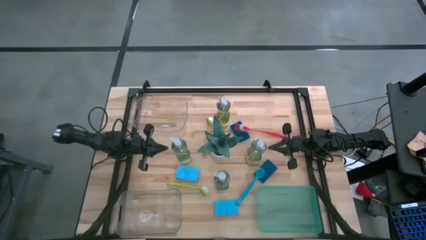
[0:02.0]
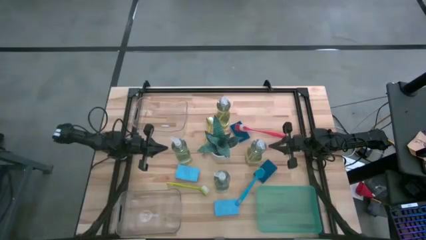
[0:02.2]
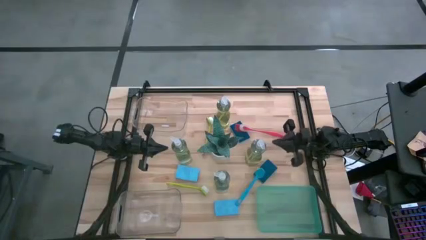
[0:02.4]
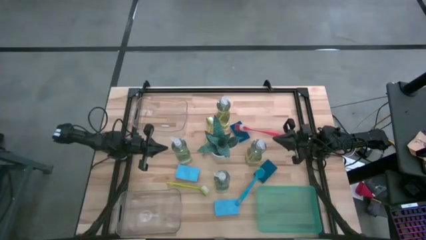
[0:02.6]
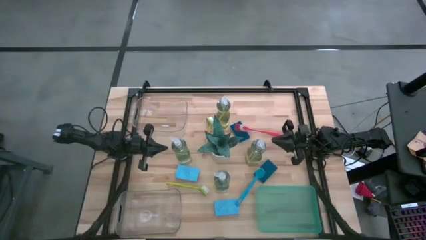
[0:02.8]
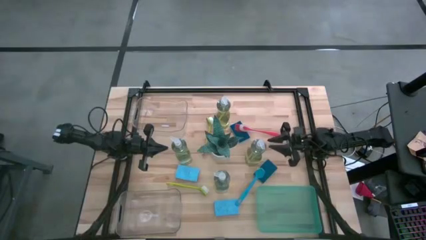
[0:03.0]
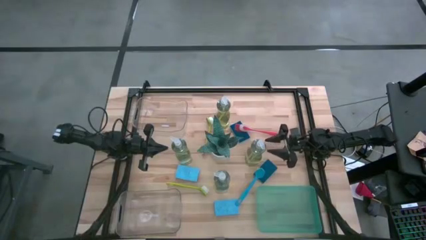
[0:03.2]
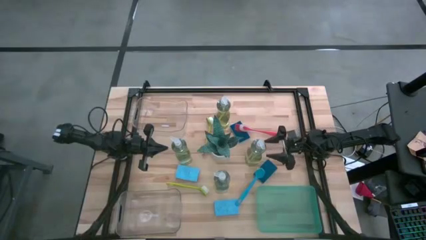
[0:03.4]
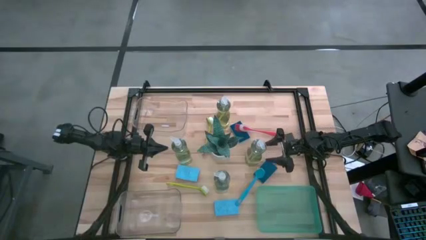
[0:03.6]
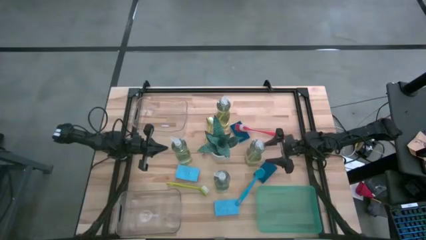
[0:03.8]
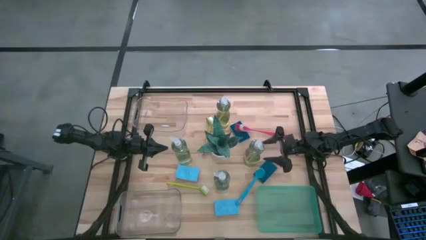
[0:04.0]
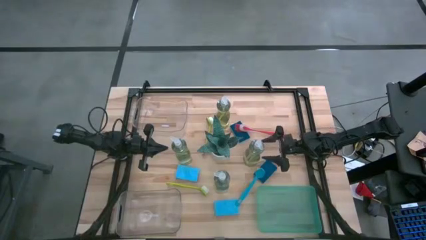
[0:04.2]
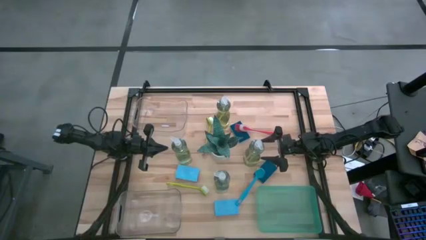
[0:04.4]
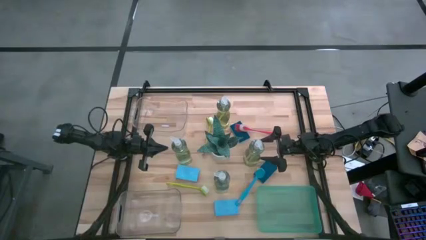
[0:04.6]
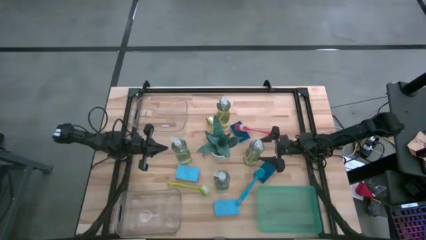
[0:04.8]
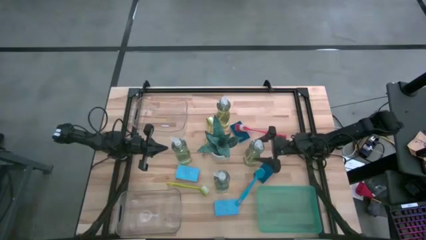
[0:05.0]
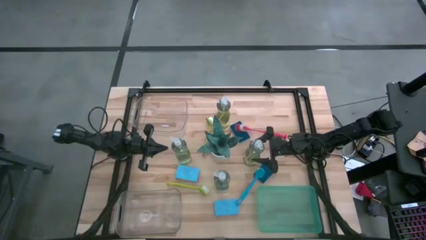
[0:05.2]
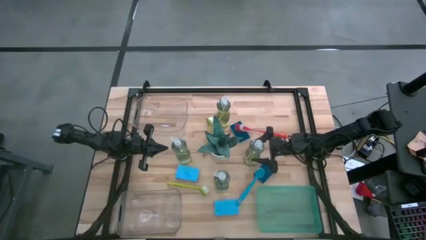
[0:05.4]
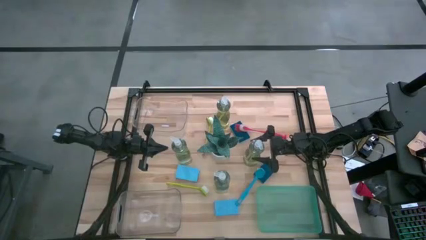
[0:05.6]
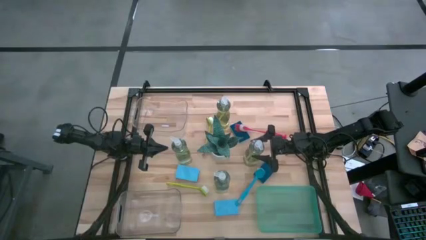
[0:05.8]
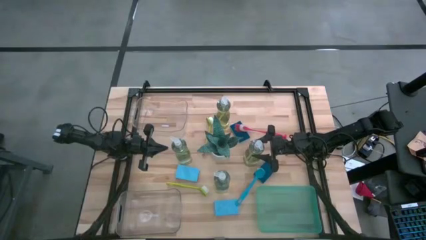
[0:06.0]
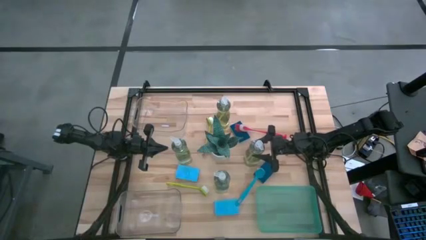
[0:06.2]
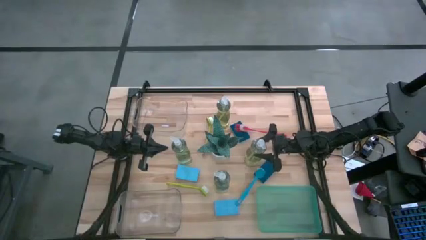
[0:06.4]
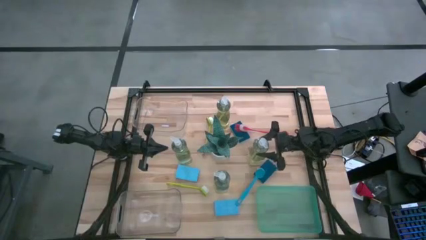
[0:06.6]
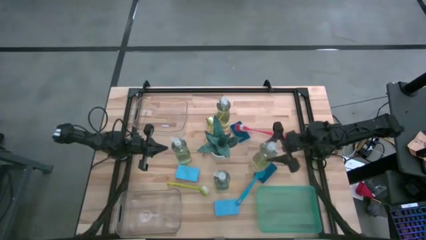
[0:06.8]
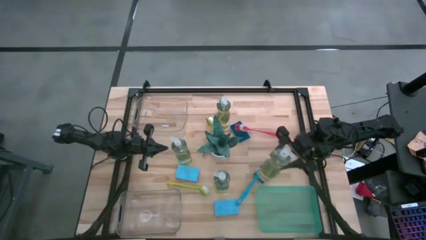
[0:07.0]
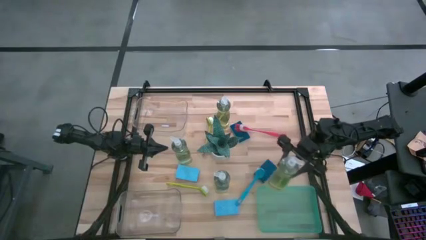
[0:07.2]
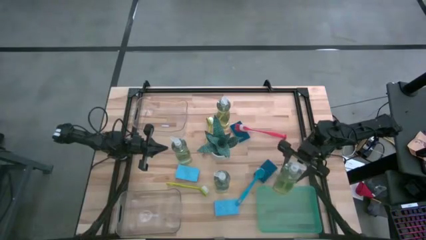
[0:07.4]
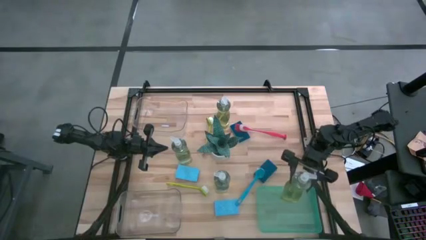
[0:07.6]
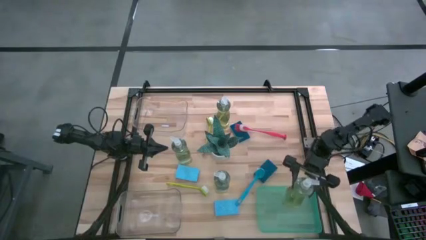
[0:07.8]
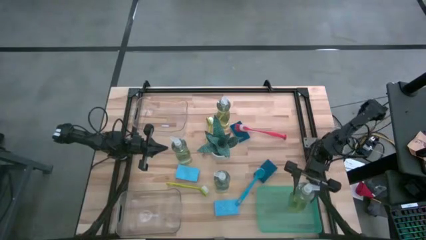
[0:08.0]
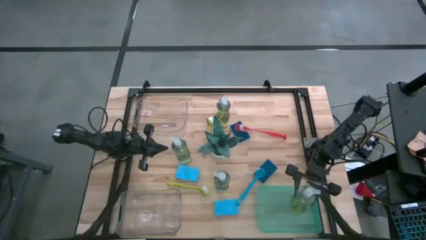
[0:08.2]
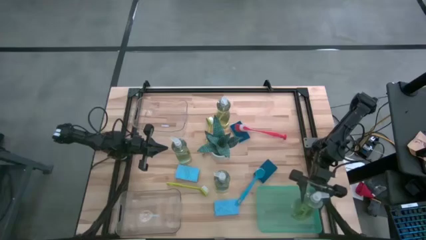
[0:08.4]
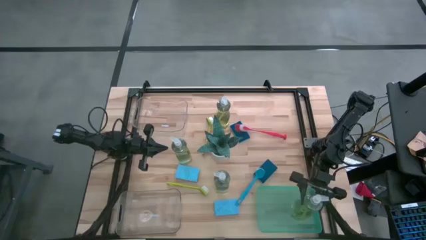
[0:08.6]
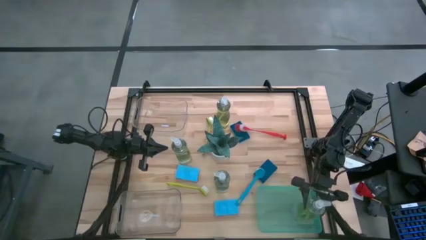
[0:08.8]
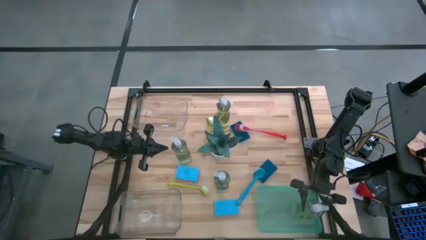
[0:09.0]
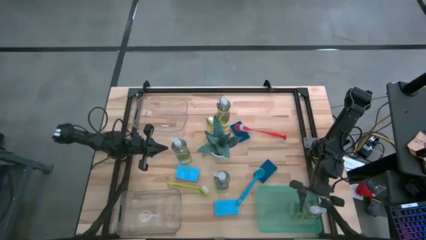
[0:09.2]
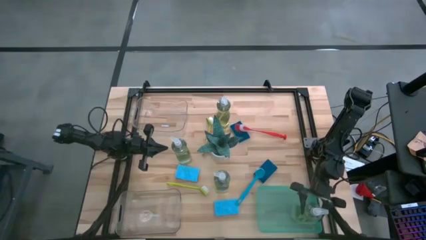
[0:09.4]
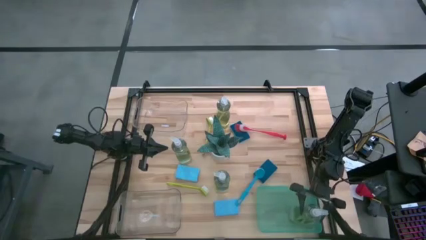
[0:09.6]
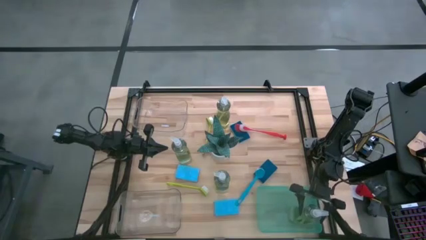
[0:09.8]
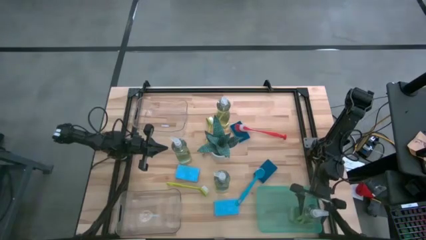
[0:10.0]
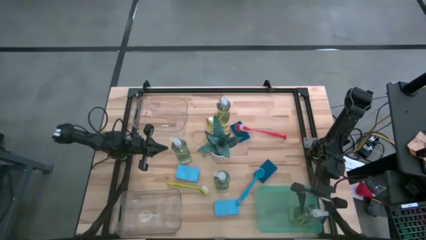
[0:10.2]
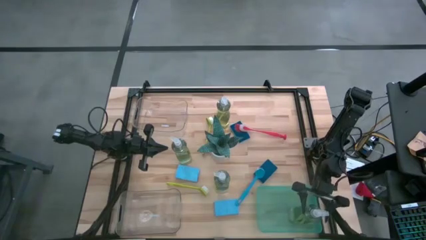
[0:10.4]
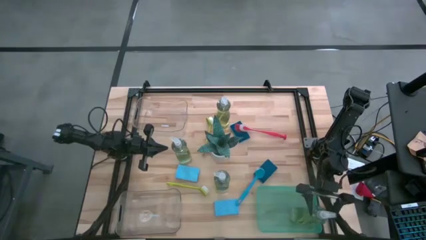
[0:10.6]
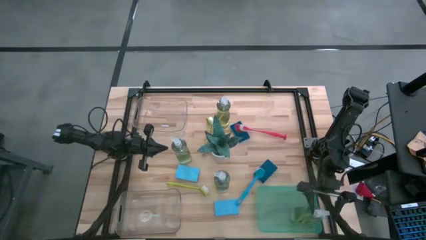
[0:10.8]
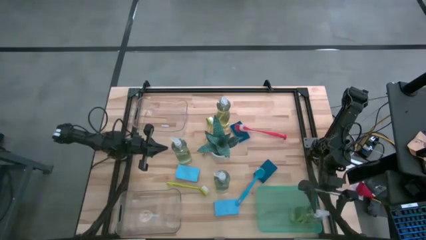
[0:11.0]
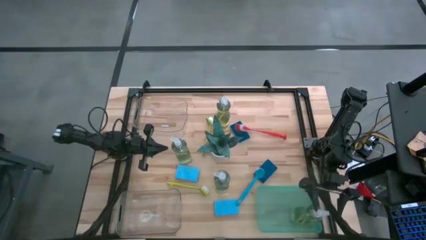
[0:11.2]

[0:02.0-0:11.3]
Task: Pick & Place Kitchen Sink Supplies
Put the yellow dish soap into the green bin

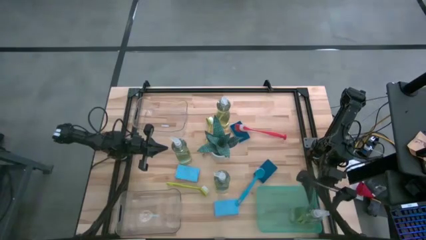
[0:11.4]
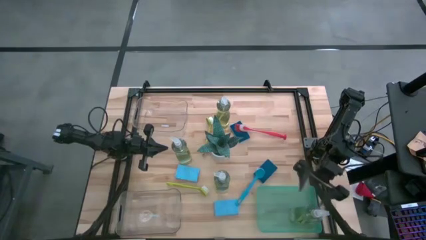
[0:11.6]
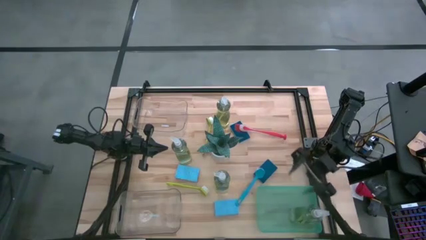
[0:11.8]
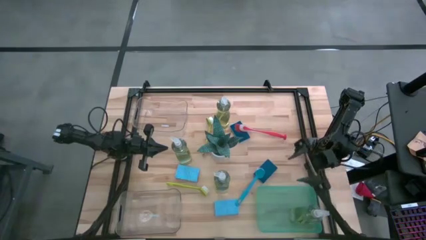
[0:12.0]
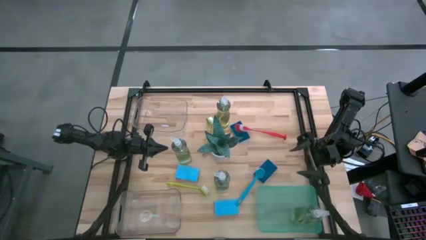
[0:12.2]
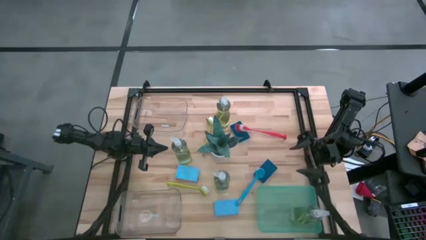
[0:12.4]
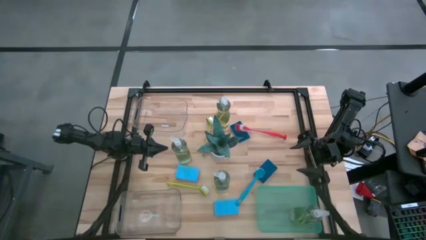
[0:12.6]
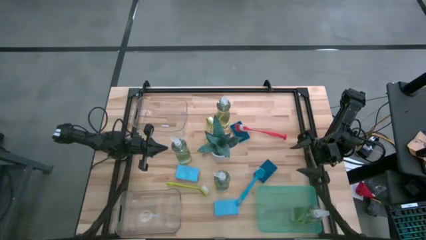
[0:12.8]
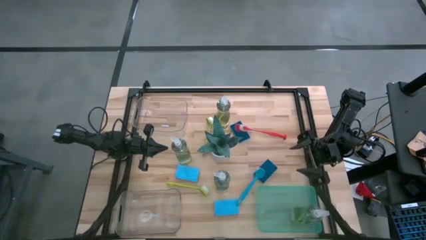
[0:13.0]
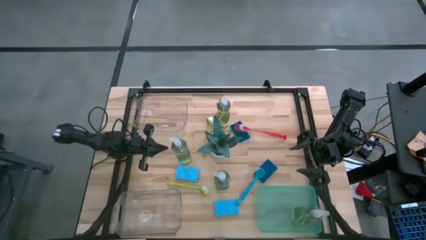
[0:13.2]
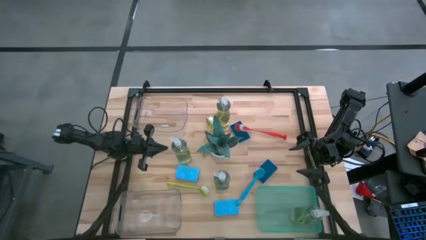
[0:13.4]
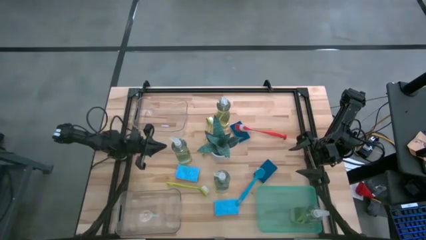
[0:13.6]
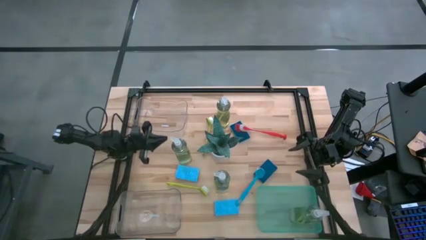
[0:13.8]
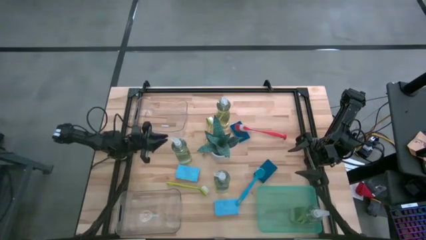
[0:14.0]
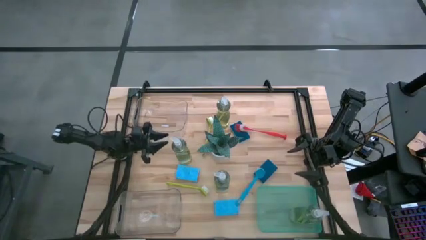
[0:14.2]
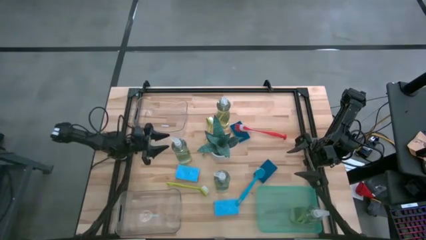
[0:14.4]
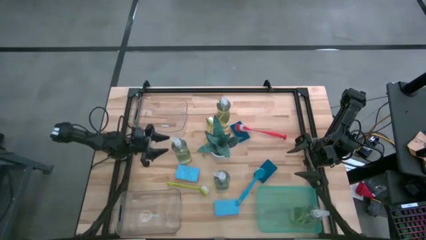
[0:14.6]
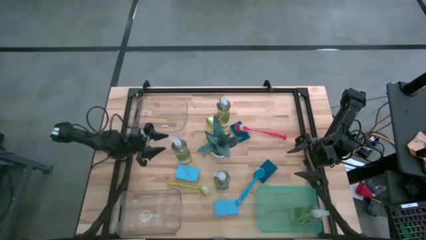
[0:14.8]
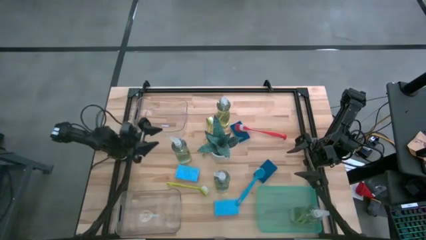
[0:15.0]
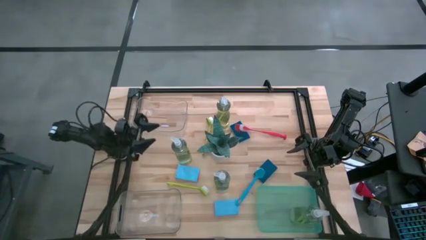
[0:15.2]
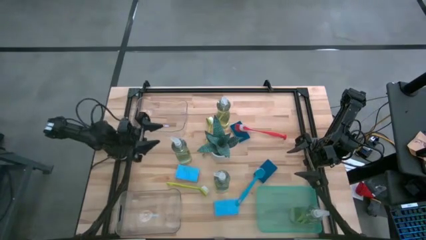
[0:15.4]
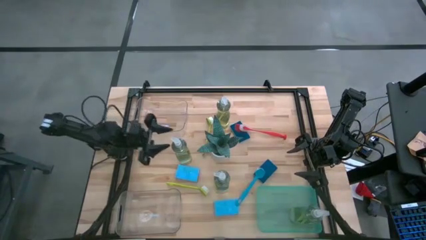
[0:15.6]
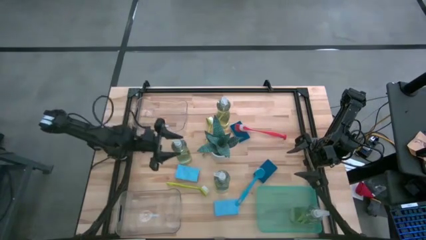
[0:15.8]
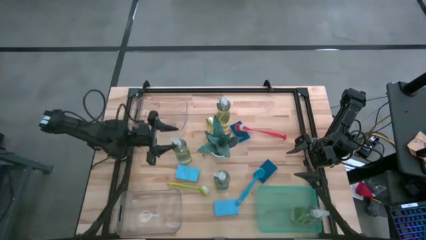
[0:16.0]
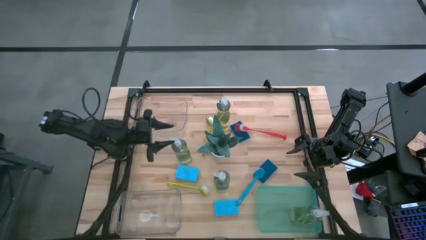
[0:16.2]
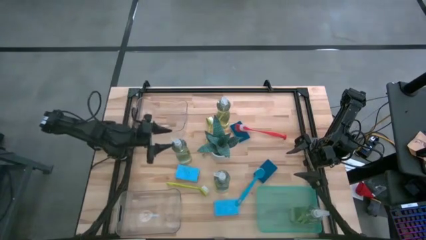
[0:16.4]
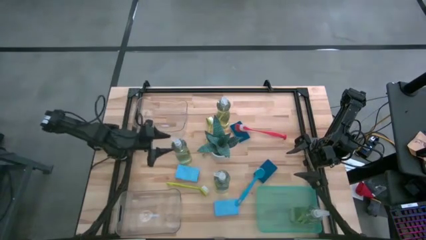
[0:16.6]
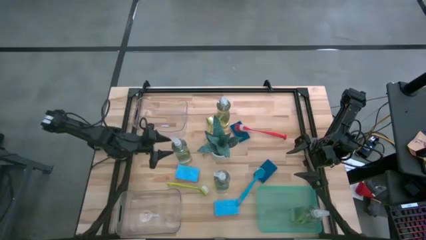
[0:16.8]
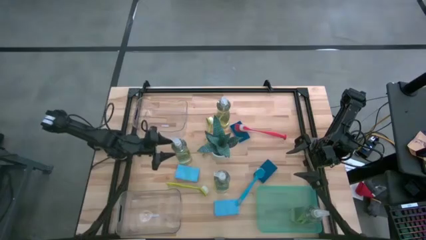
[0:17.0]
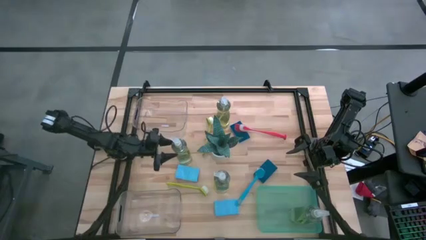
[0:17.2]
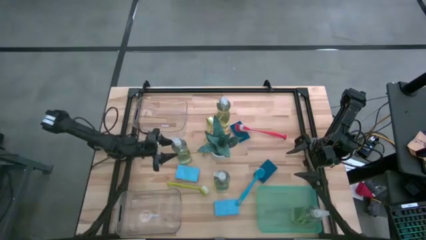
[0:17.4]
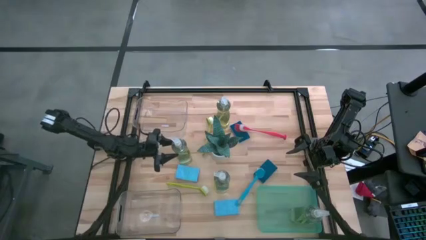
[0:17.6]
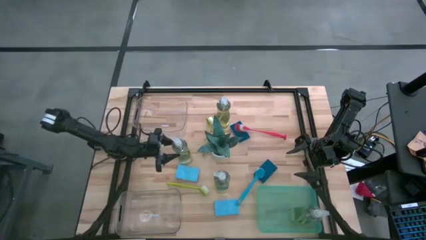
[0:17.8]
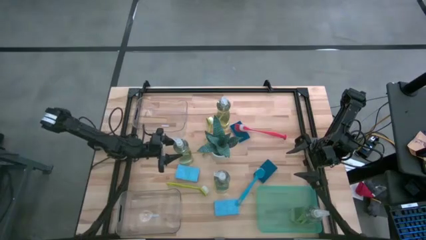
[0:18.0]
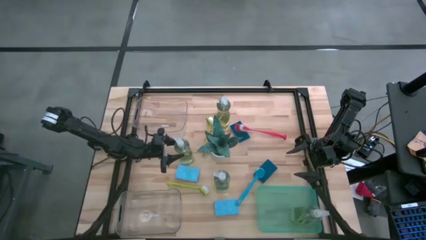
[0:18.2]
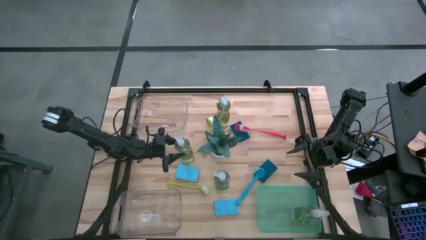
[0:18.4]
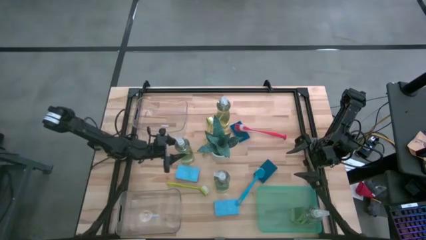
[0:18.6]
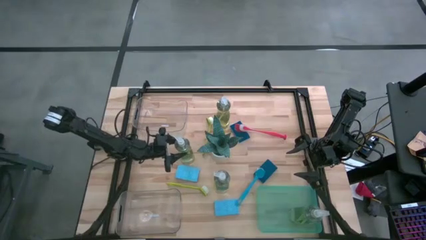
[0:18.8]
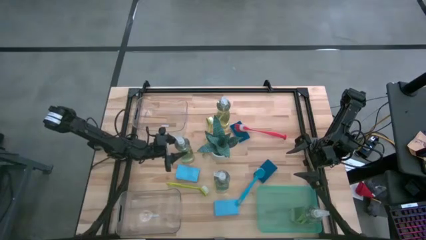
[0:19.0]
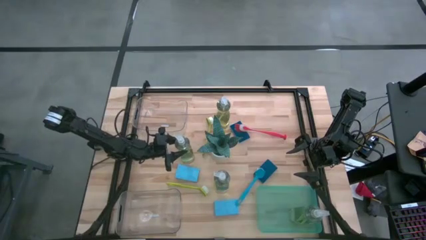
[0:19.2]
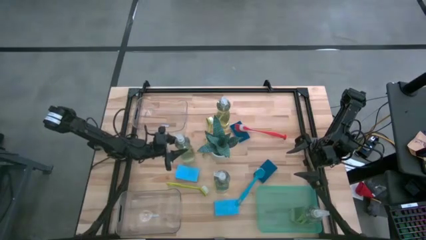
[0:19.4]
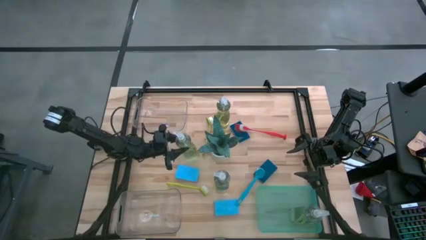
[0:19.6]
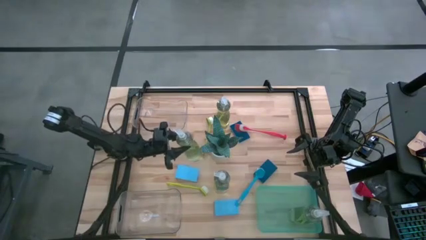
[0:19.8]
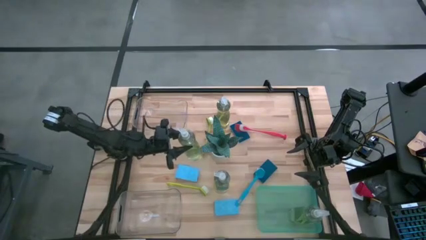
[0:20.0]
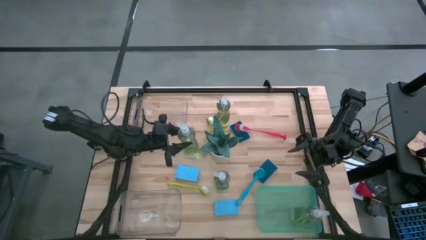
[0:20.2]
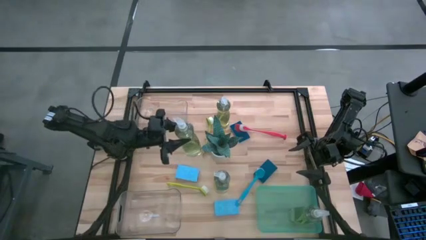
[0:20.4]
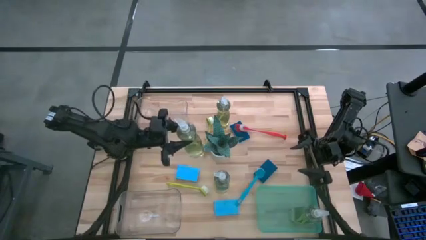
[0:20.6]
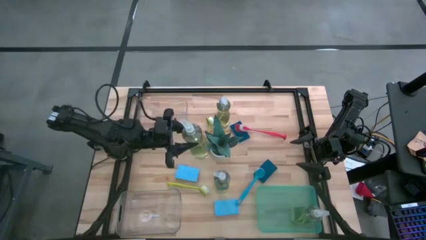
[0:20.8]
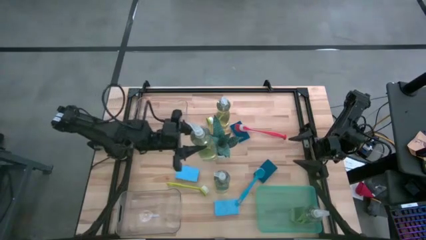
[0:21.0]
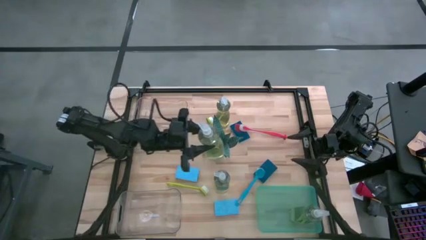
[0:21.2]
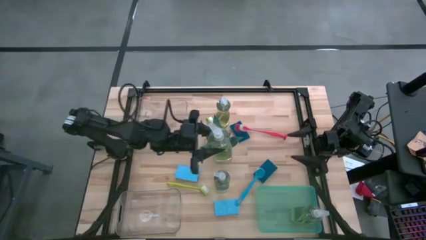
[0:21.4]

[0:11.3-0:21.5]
Put the yellow dish soap into the green bin
